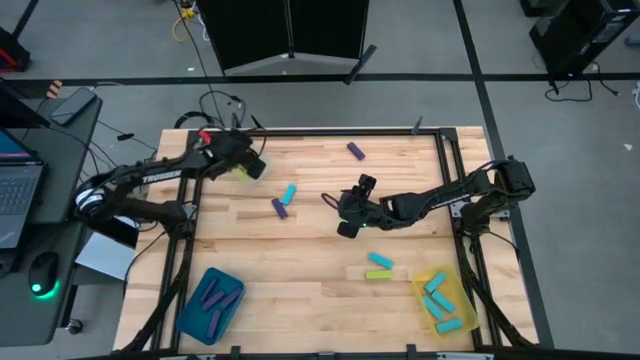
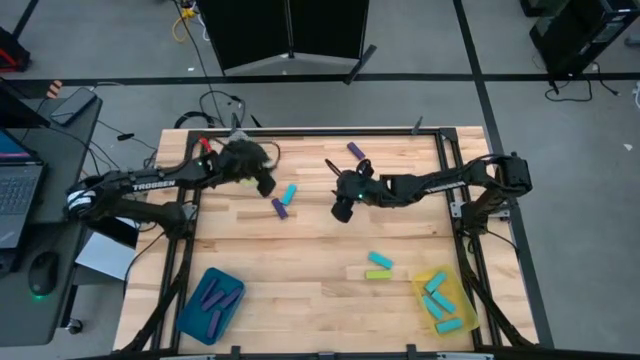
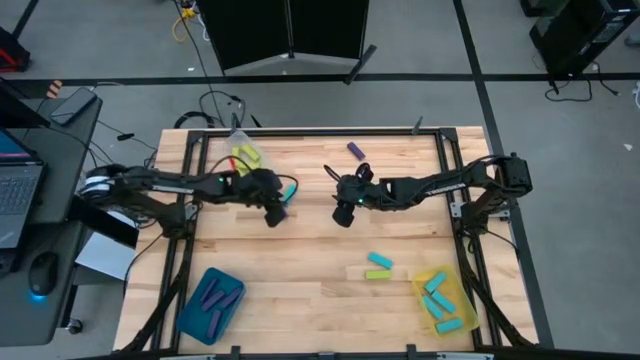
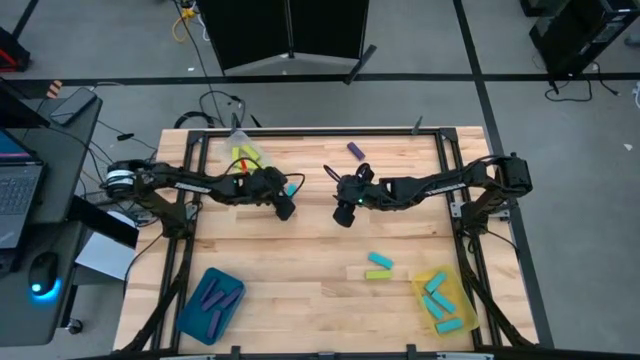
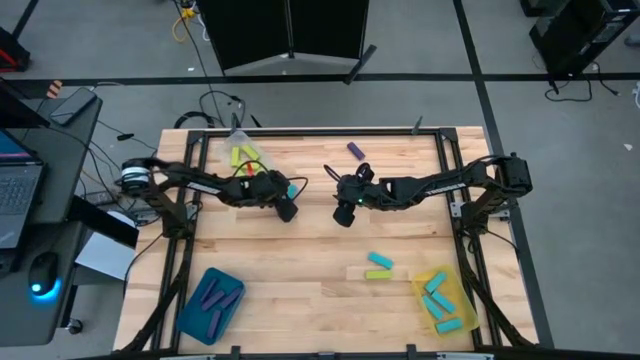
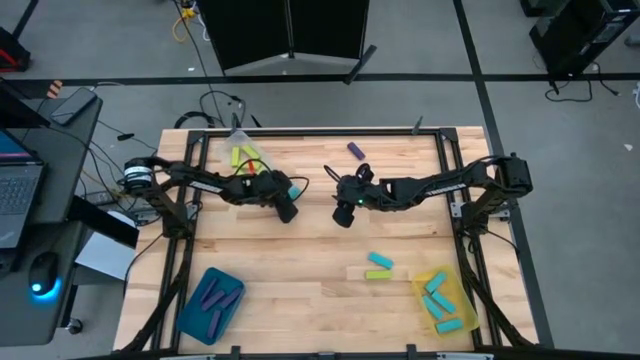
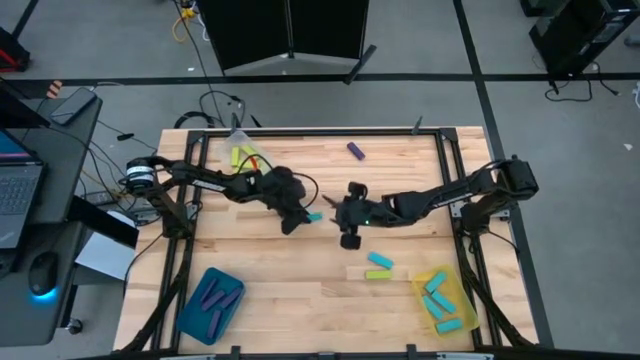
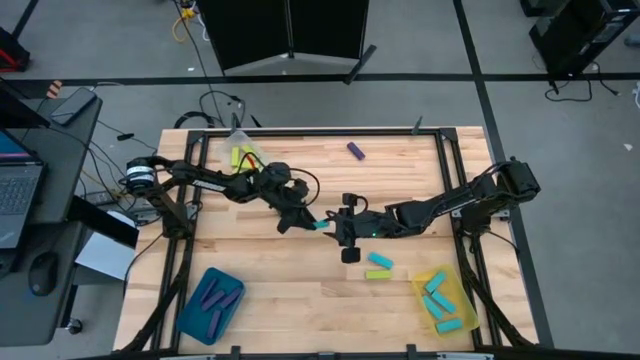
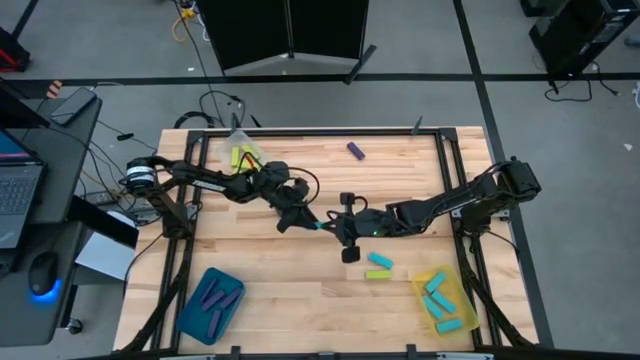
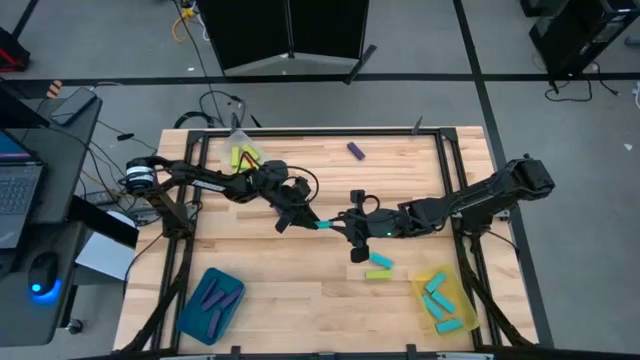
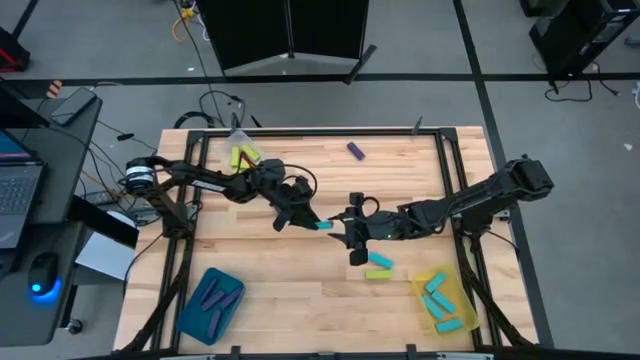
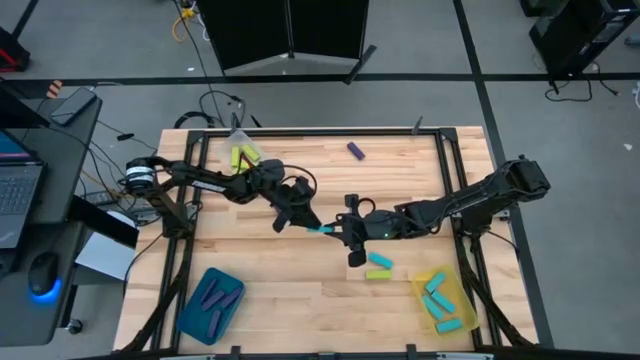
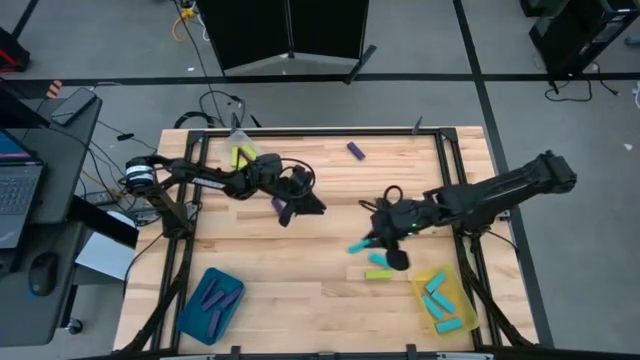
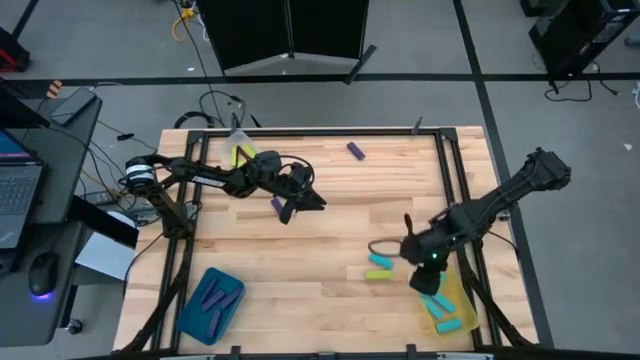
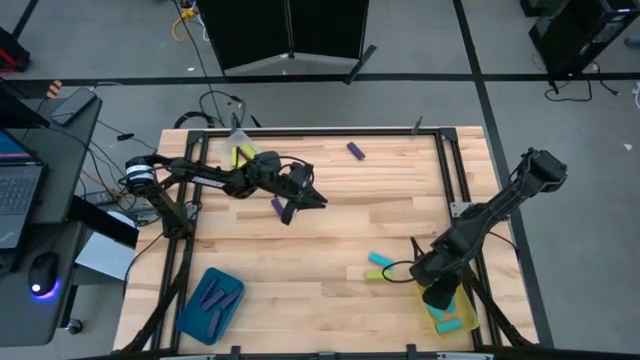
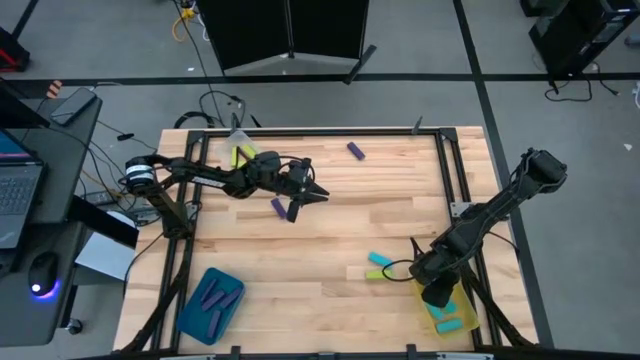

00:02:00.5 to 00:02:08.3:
Task: Sort blocks
Put the blue block into the yellow bin

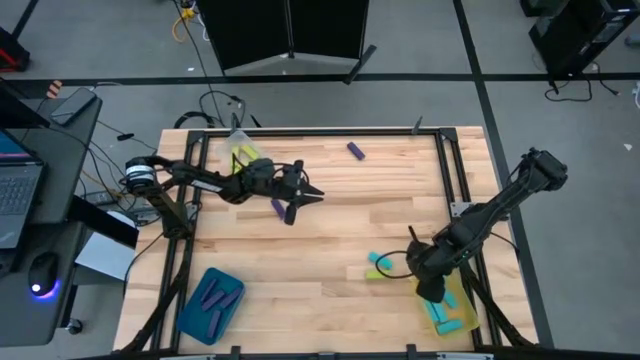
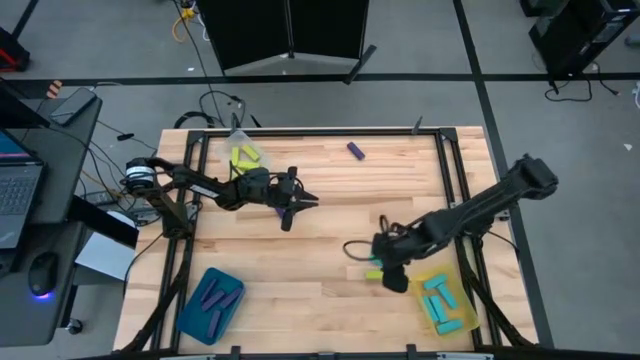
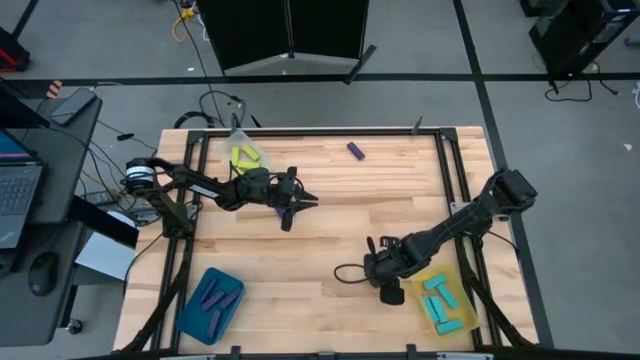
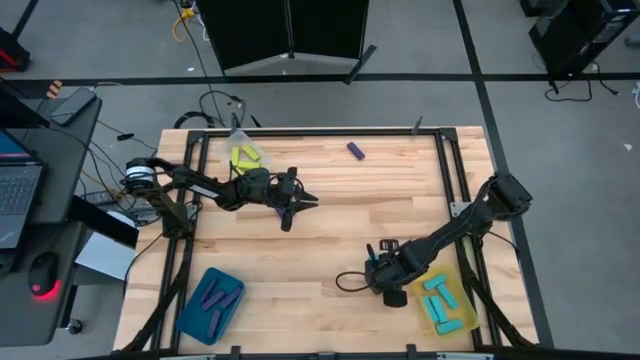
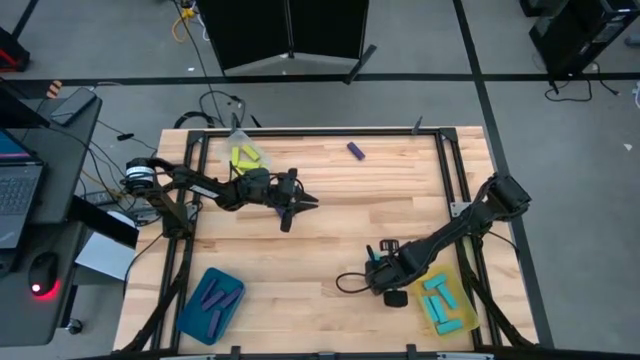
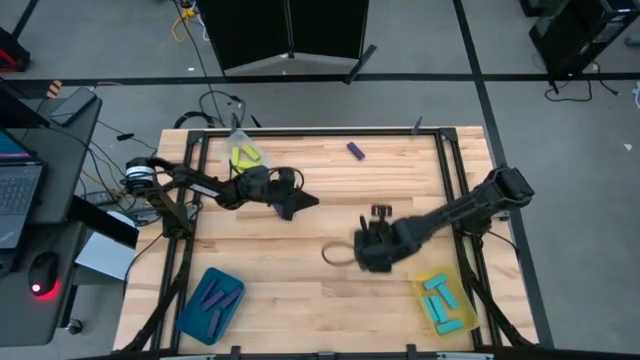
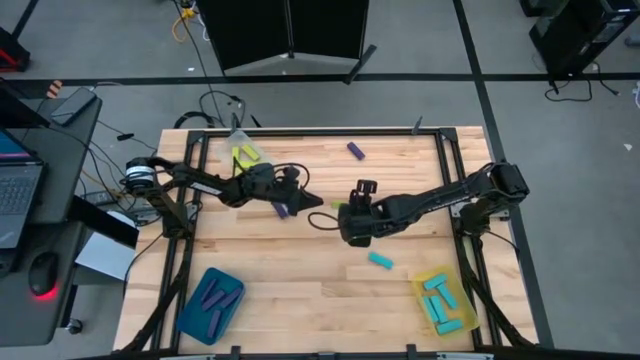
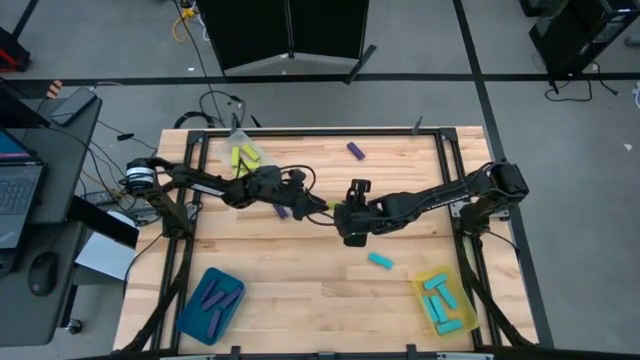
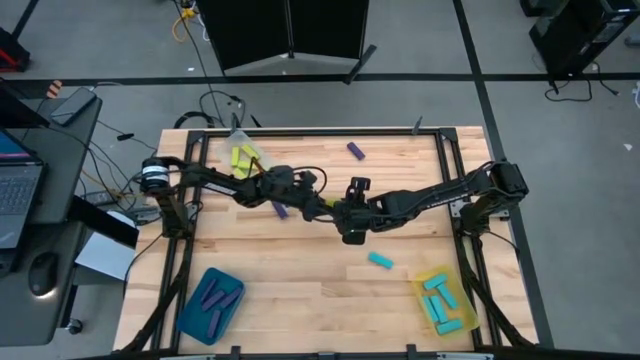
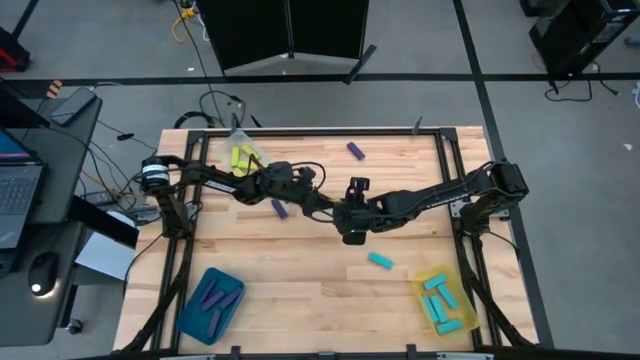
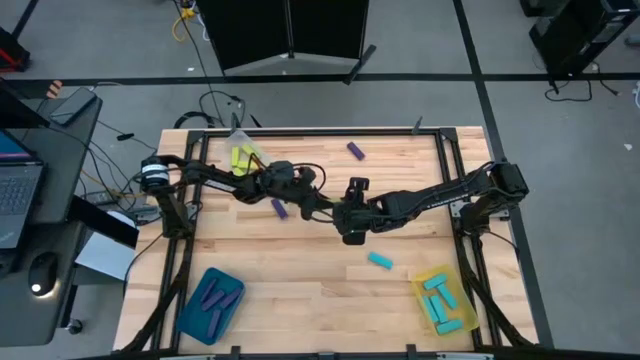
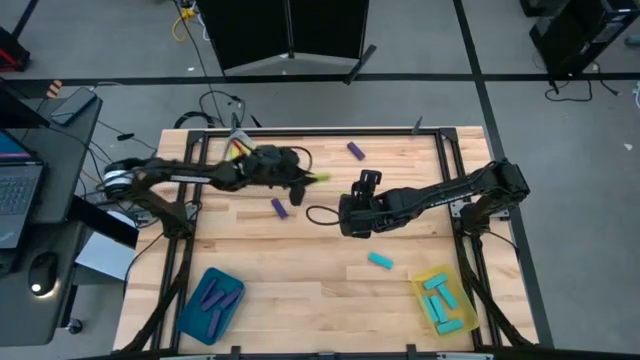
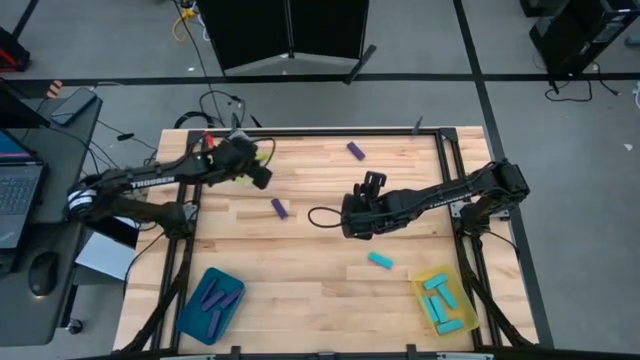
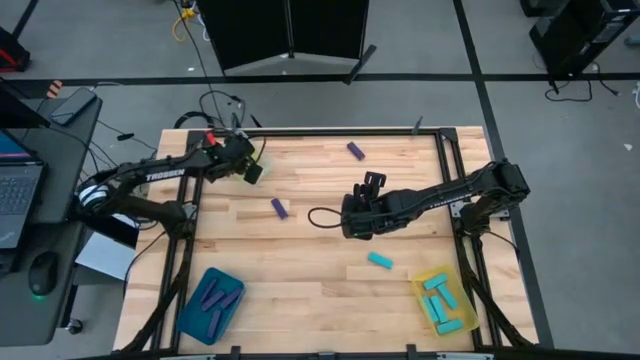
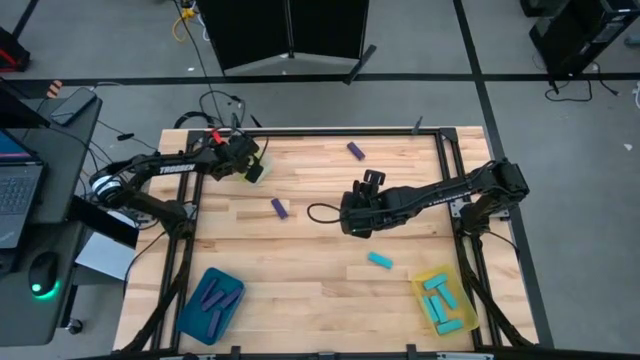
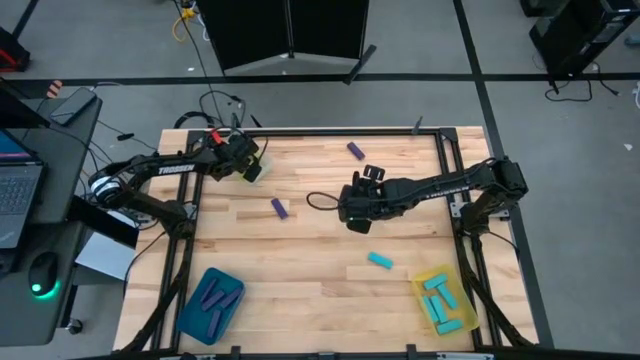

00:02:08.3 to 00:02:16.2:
Put the green block into the transparent bin

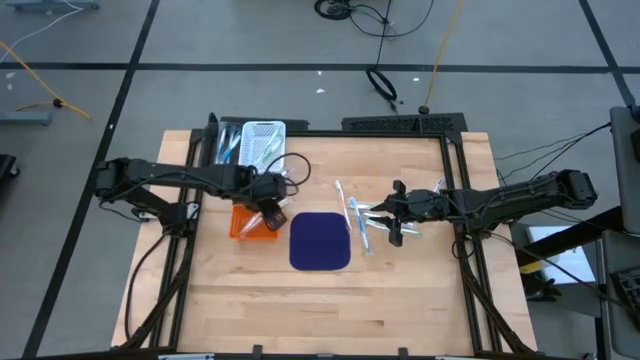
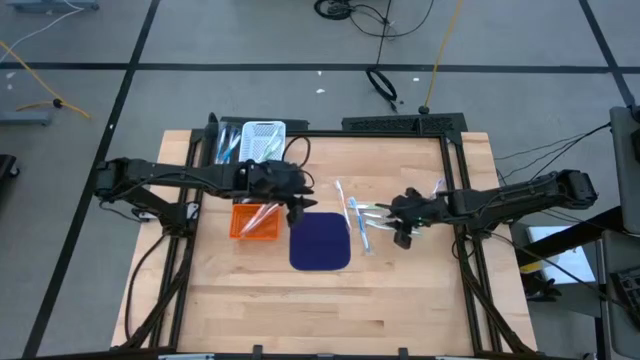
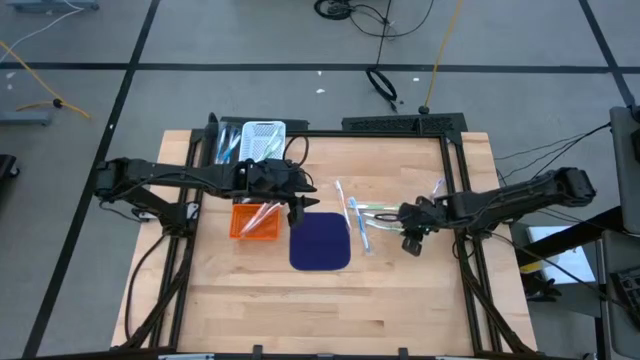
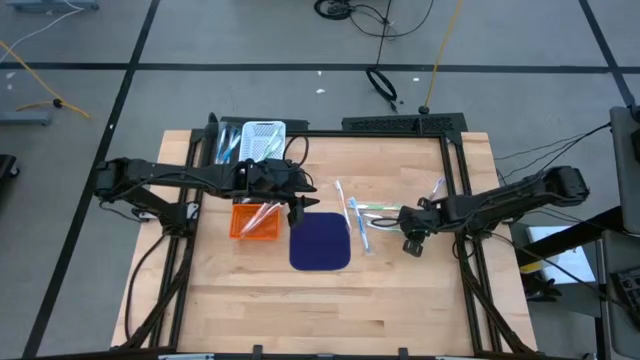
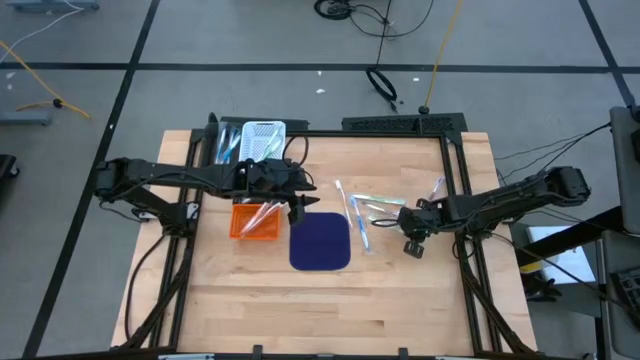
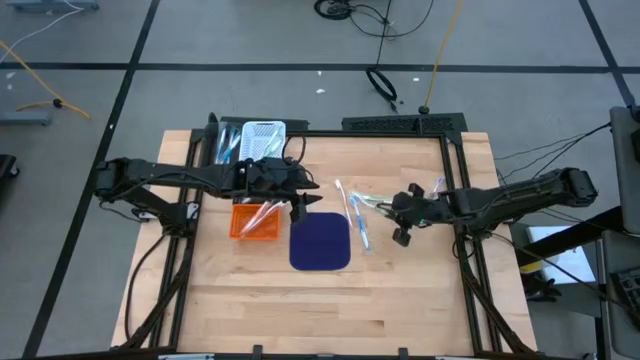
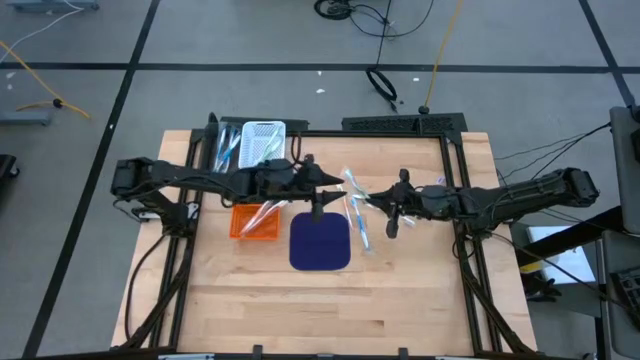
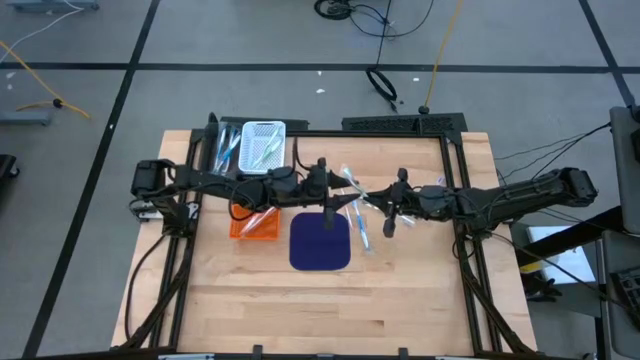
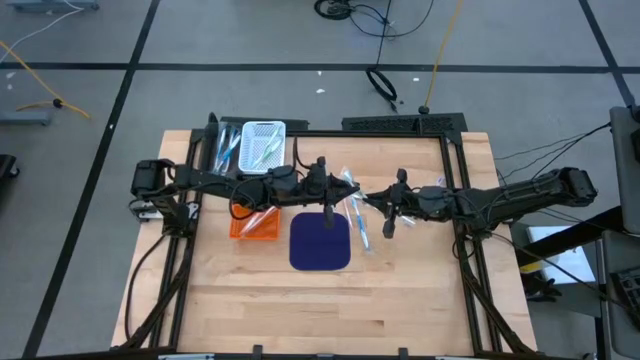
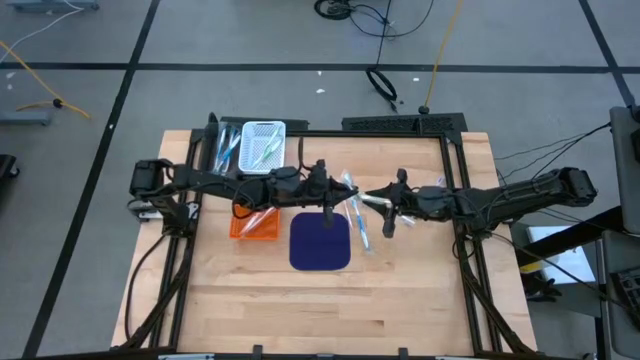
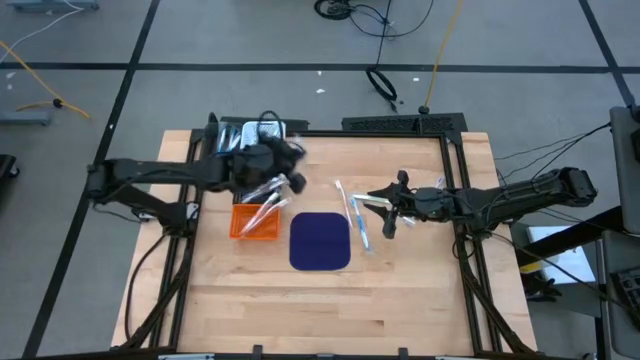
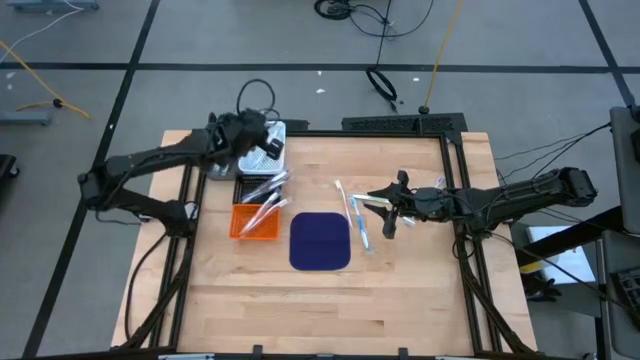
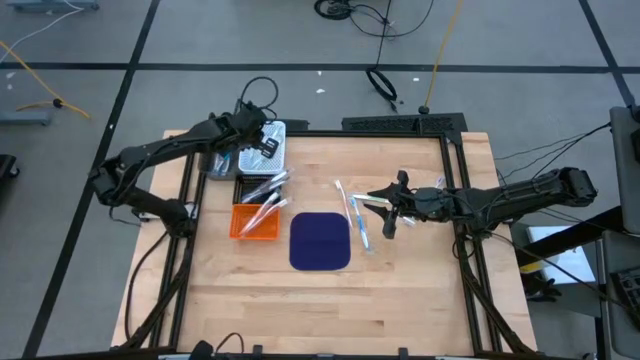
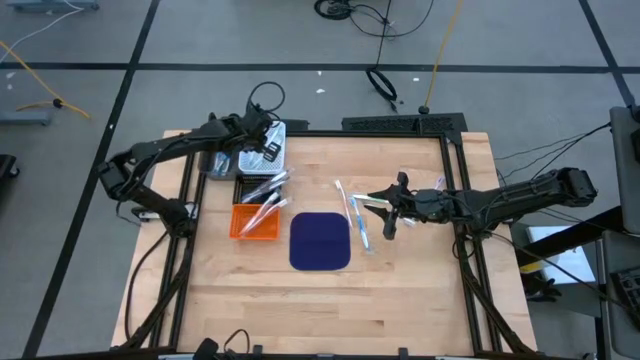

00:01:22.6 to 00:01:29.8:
Task: Pick & Place Toothbrushes
Put the green toothbrush into the white bin
